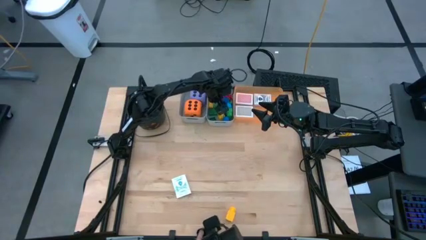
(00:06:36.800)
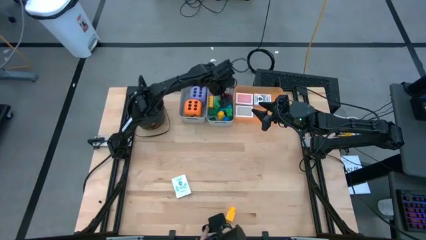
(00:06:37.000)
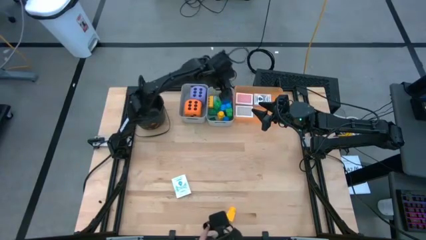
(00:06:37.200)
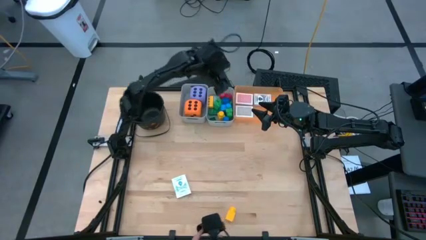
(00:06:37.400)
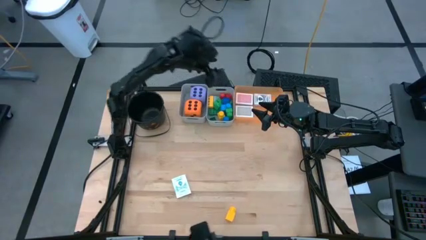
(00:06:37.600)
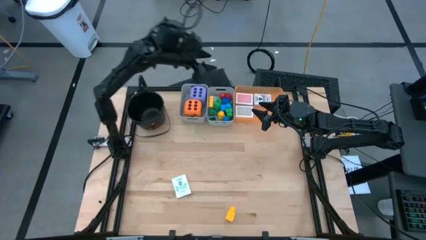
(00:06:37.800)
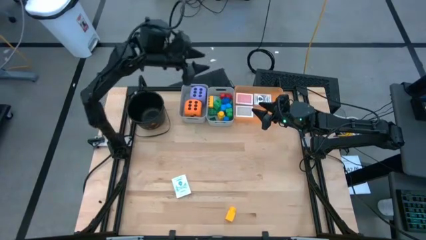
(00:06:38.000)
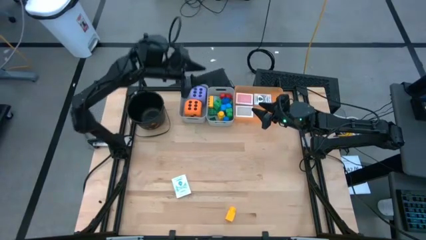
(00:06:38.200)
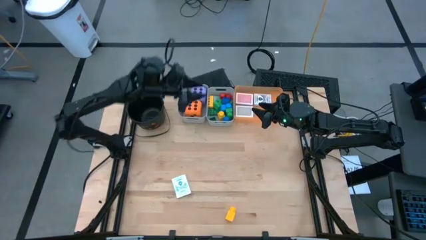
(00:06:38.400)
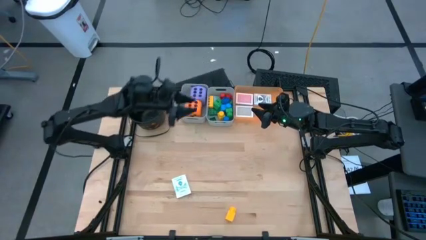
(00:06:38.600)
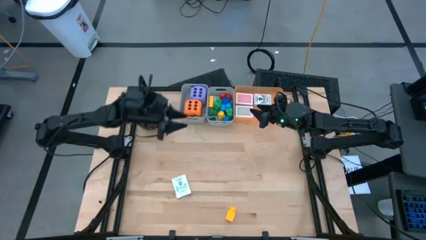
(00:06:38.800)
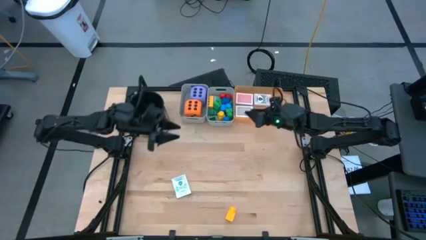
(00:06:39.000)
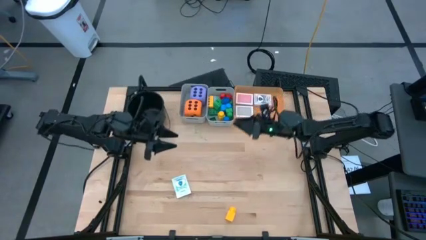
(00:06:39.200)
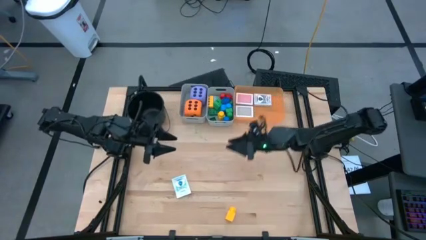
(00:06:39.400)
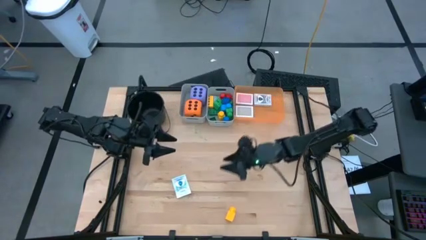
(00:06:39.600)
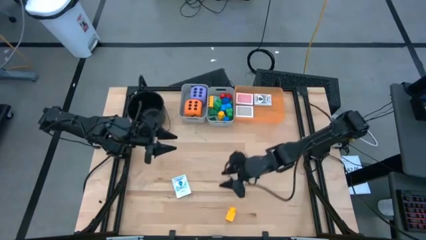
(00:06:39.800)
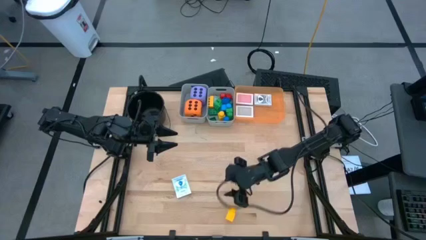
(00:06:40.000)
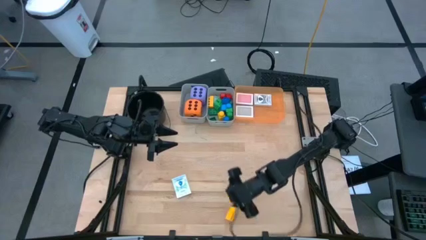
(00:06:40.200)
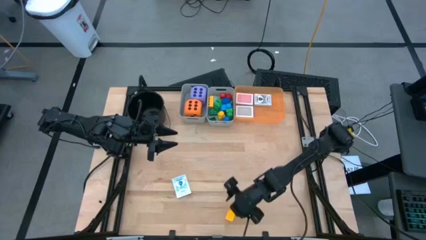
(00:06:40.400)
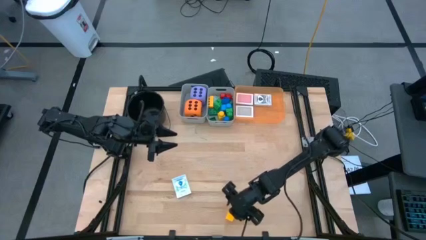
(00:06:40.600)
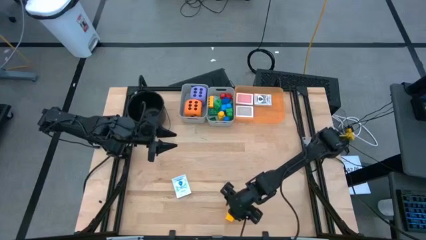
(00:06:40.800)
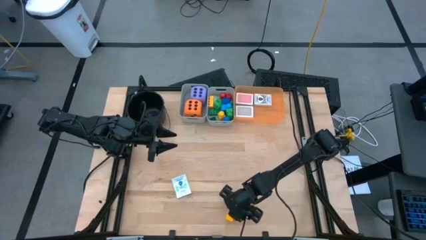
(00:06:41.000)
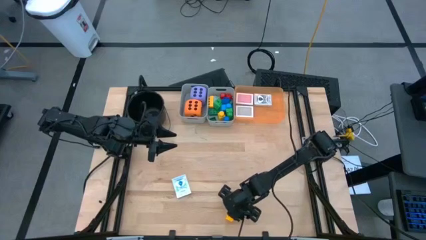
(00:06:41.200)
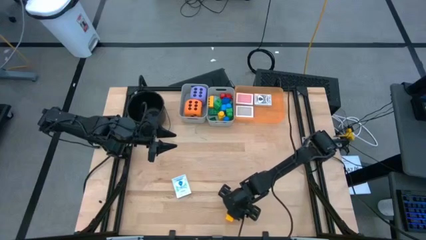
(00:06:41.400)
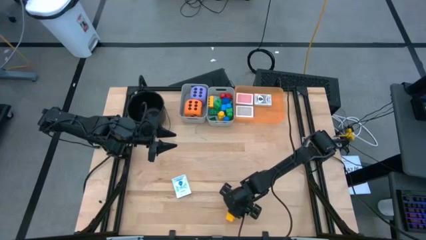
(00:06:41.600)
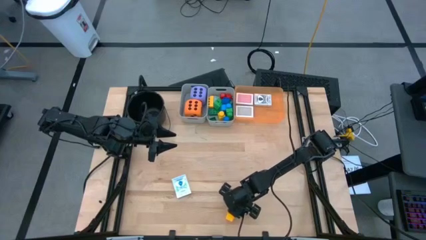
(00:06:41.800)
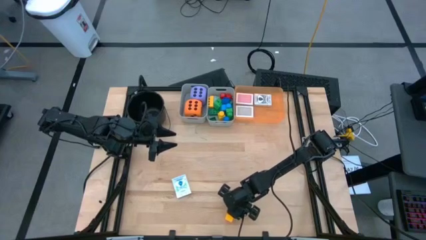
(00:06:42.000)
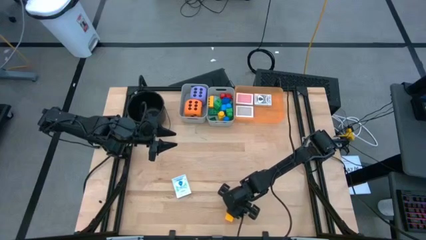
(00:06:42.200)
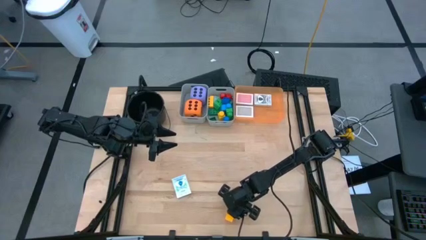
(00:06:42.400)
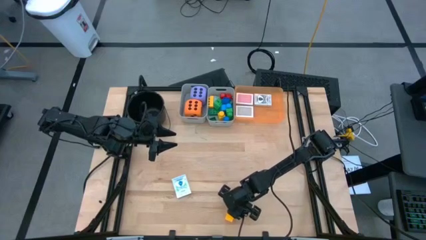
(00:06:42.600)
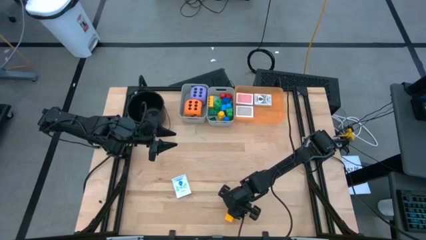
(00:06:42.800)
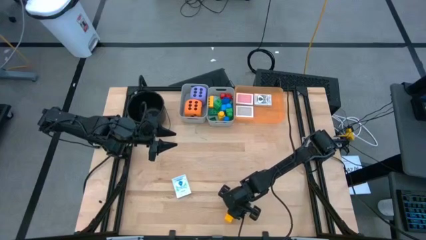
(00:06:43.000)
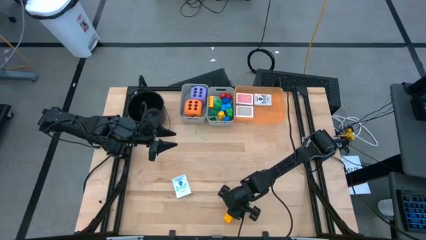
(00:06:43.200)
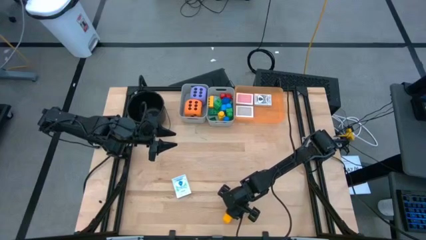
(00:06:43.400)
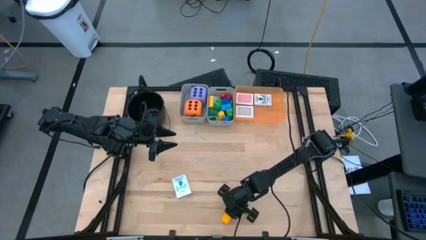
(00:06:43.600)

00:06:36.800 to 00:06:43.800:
Task: Pick & Place Toys
Put the yellow gamepiece into the right gray bin

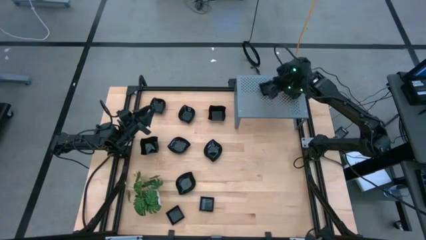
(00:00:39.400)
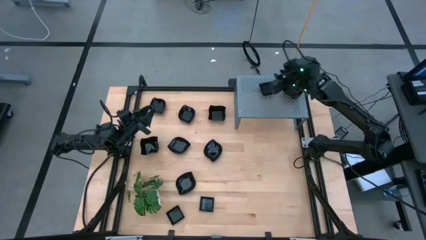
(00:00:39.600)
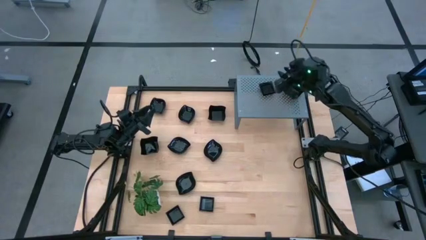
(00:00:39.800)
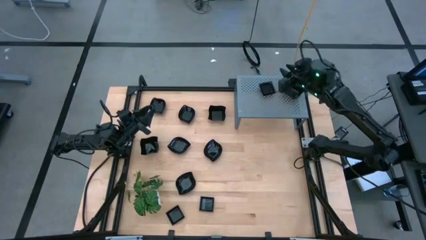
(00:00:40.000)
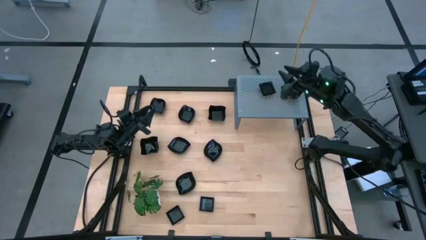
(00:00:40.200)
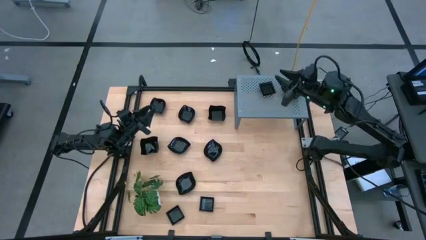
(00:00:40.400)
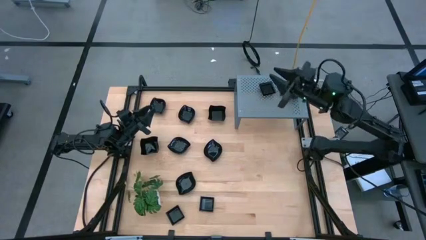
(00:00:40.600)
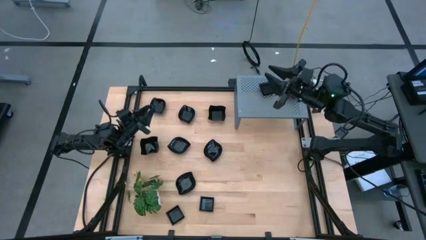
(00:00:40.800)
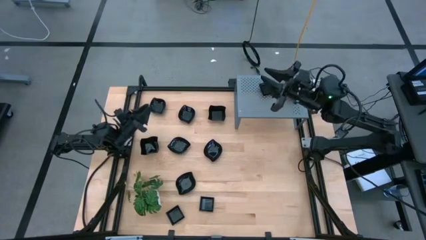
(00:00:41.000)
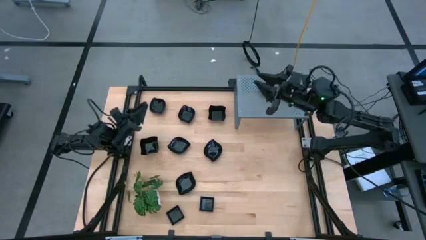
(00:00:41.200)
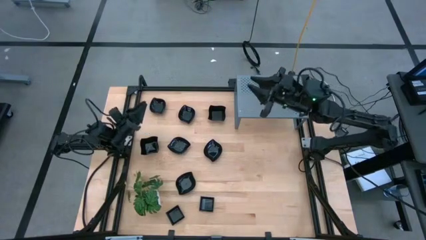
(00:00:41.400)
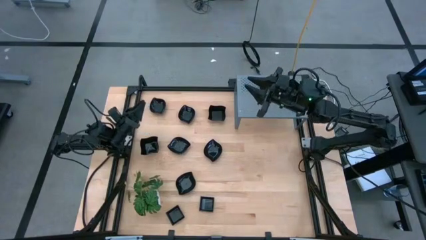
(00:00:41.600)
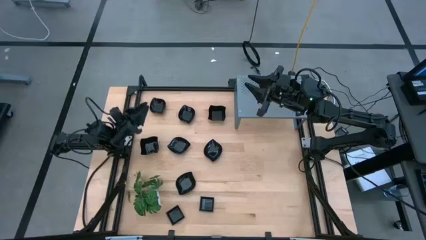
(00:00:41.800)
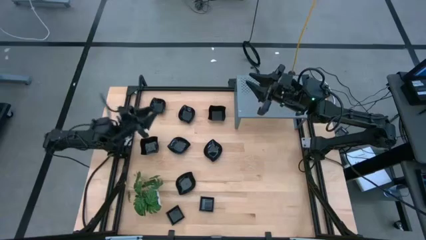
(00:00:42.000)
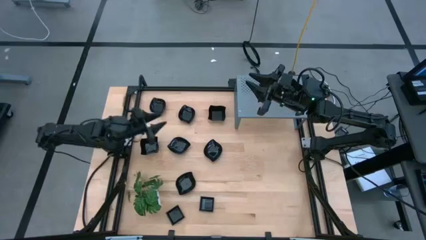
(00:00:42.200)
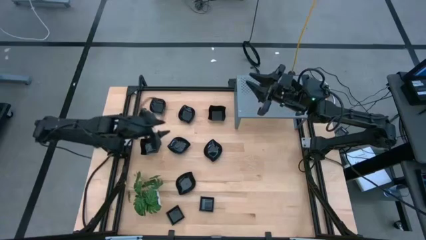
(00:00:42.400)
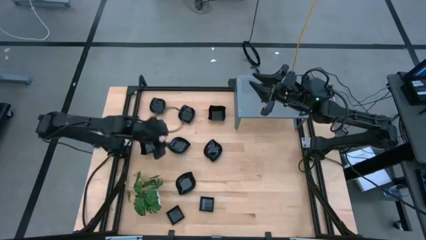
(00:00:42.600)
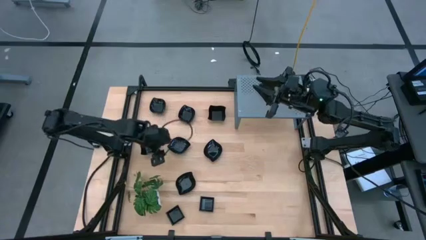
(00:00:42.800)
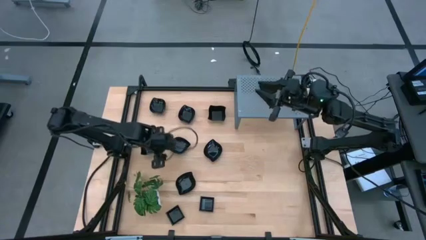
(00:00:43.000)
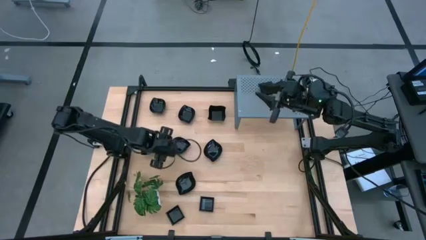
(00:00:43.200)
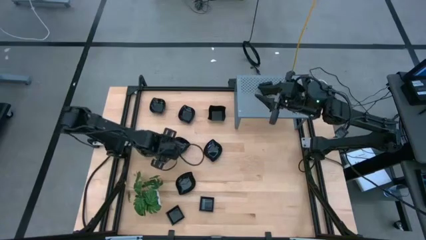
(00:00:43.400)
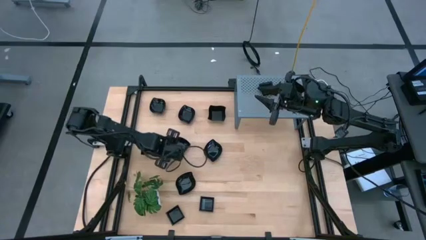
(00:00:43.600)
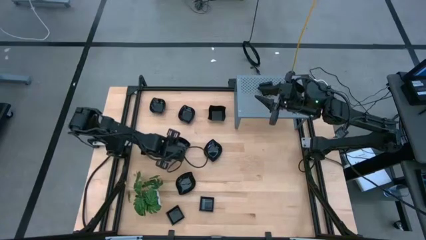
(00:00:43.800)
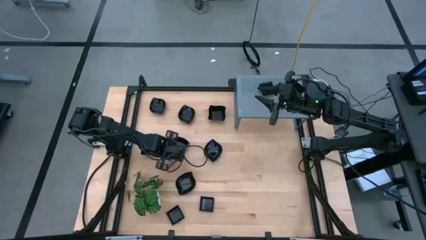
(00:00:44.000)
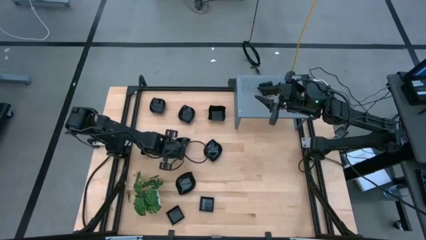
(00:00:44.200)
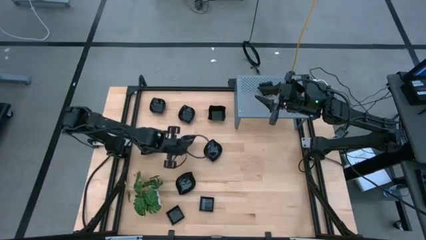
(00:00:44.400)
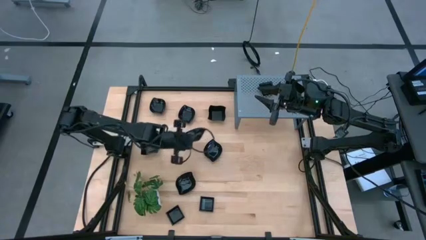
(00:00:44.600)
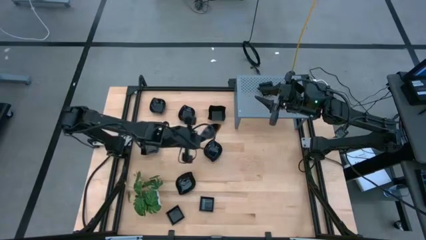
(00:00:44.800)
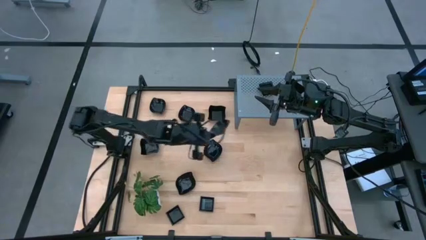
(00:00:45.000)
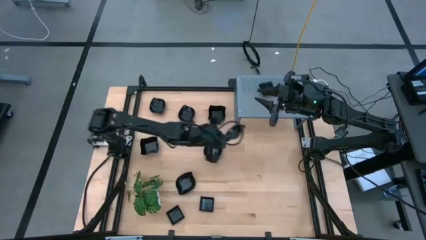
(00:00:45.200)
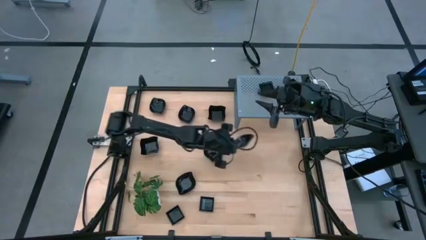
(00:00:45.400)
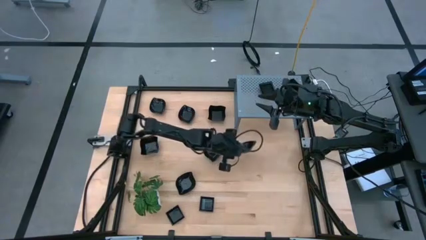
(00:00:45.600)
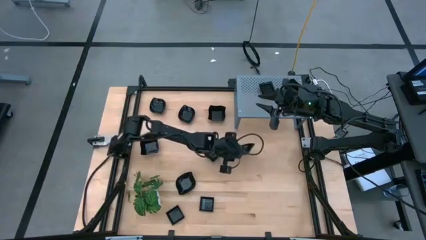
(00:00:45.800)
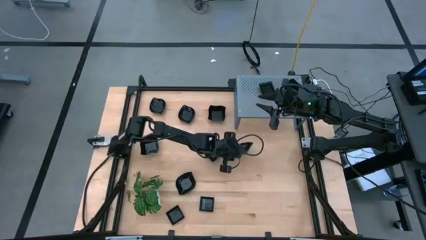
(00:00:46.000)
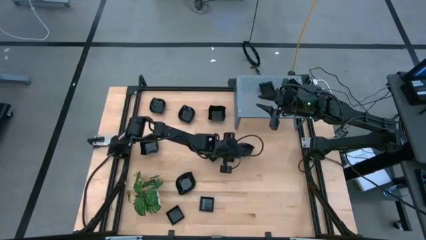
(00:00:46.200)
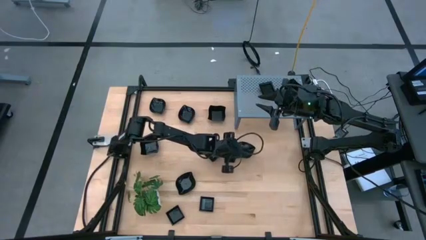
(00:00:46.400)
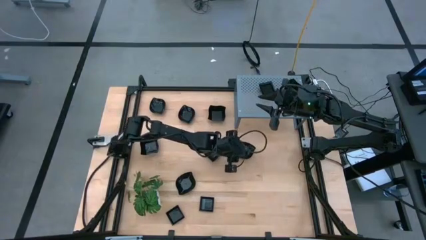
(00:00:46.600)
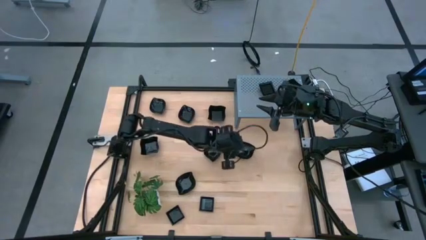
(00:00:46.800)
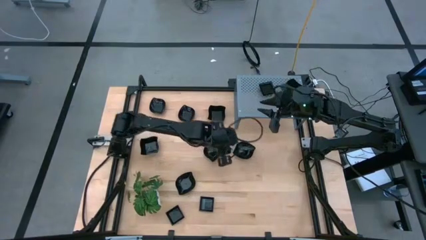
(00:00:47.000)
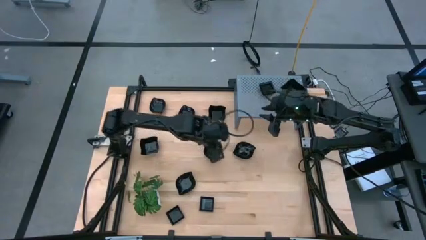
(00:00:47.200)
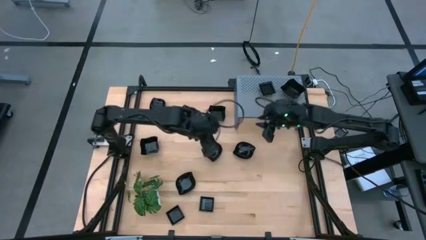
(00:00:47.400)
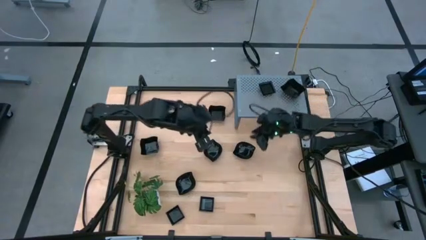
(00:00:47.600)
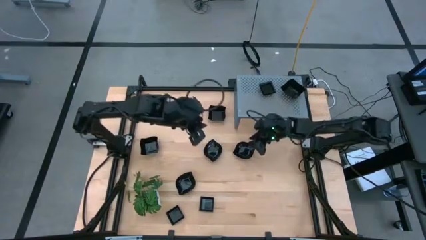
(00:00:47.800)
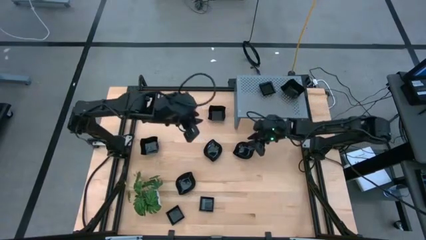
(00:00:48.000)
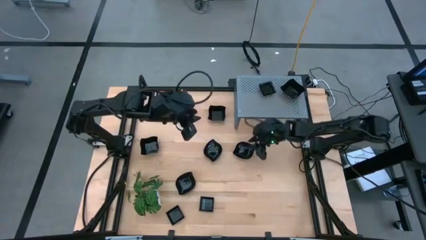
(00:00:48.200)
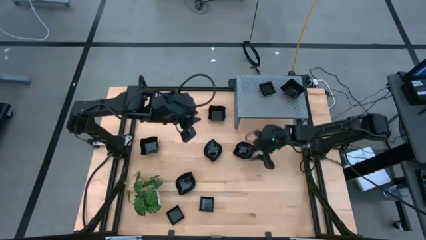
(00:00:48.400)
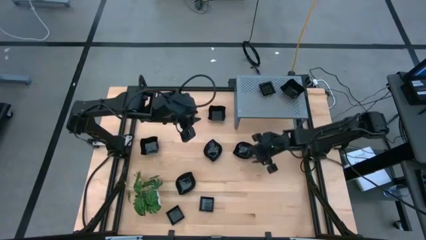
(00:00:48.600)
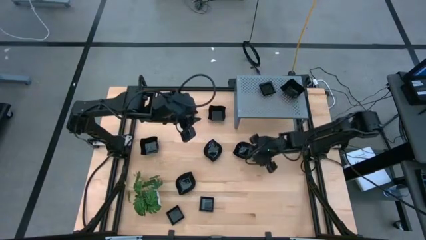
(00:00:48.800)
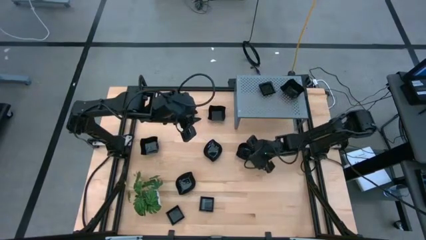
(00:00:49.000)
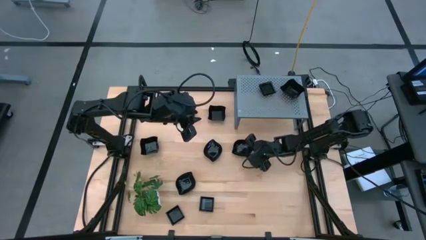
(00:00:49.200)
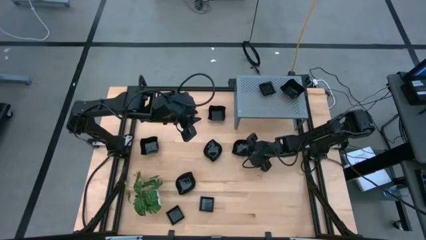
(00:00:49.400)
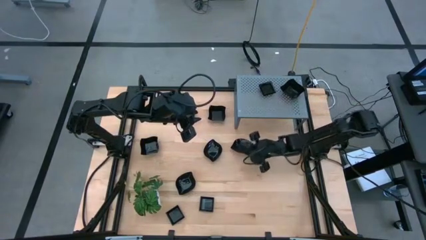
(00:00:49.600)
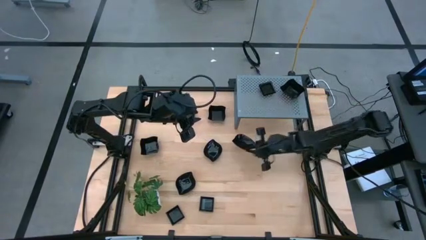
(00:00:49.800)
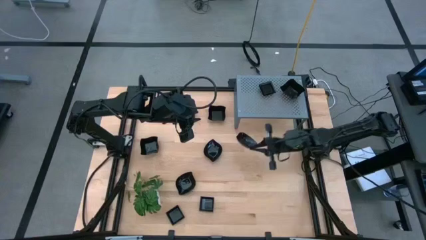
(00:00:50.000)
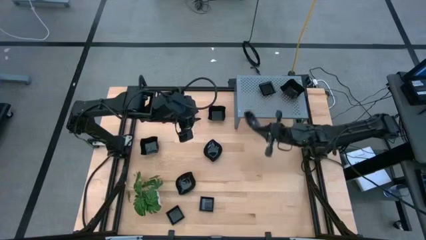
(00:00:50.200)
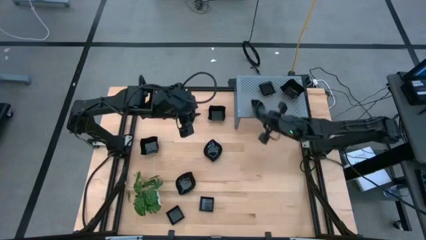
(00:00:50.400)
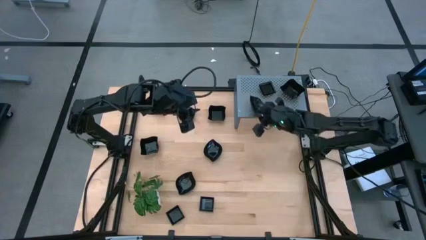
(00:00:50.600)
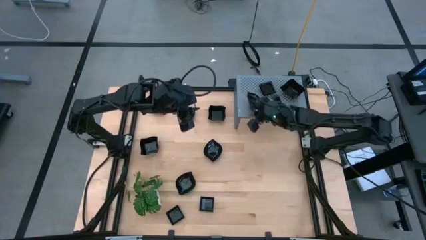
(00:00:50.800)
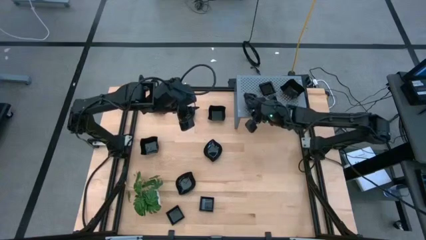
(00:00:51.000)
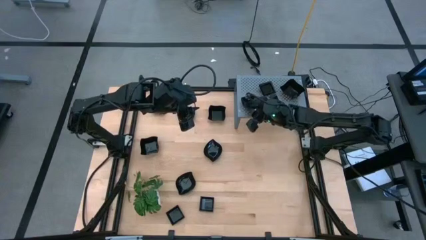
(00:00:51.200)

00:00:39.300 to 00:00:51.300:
Task: Pick & Place Mini shaped plates
Put the leaf-shaped plate on the shelf
